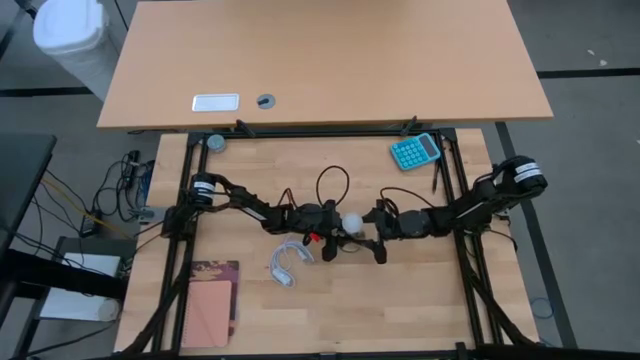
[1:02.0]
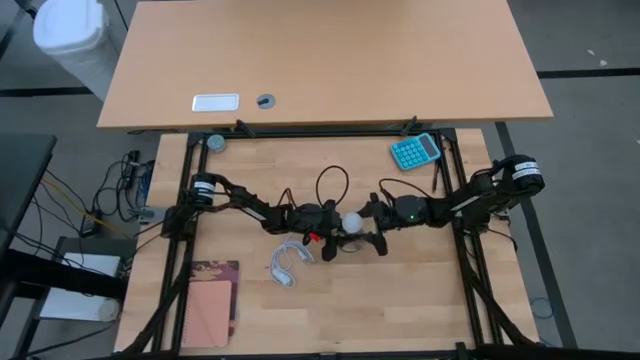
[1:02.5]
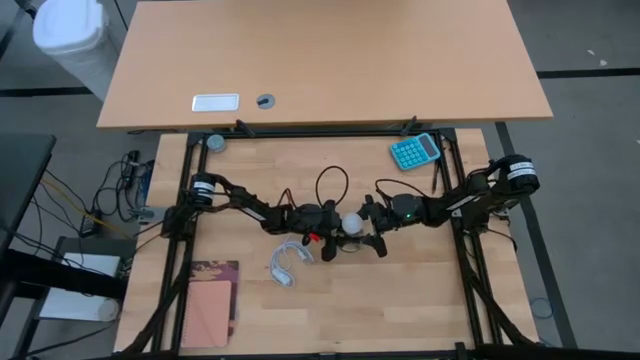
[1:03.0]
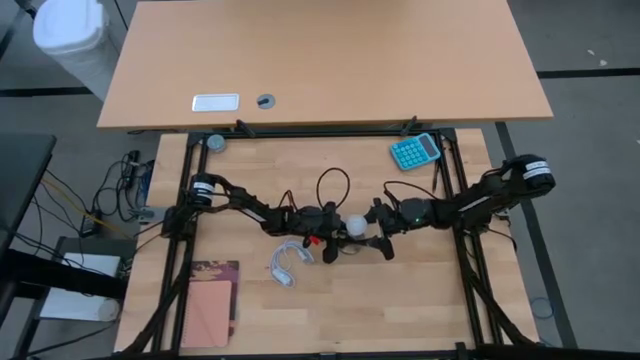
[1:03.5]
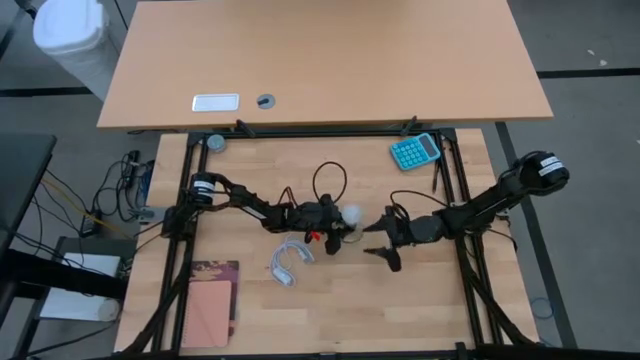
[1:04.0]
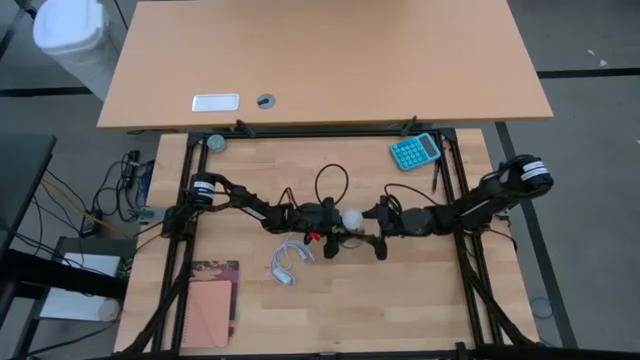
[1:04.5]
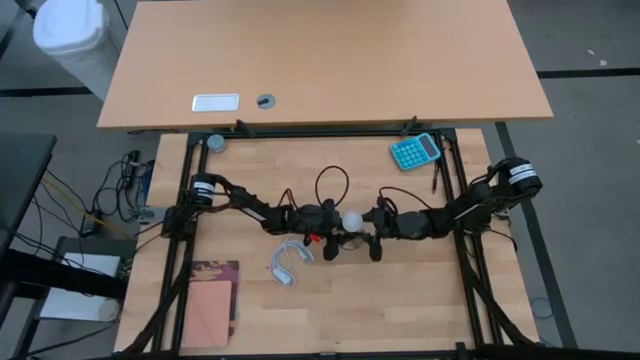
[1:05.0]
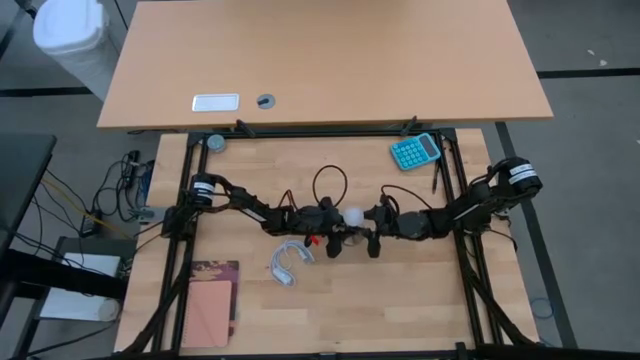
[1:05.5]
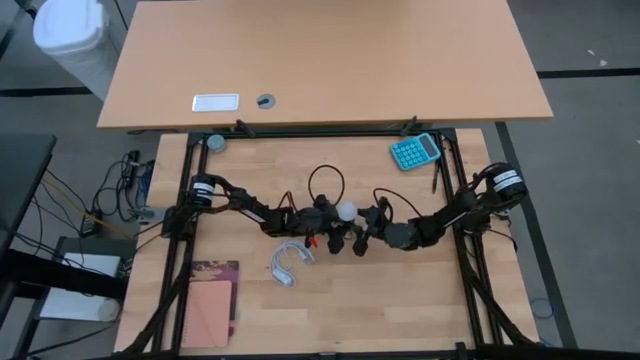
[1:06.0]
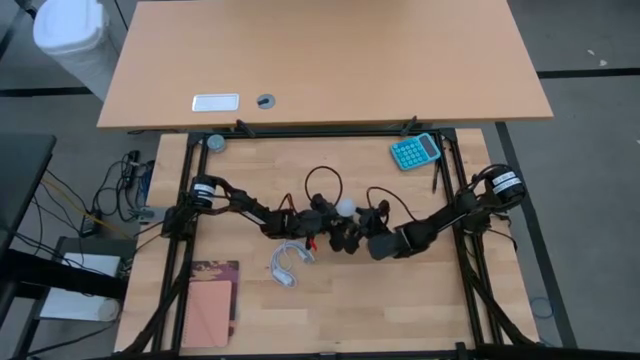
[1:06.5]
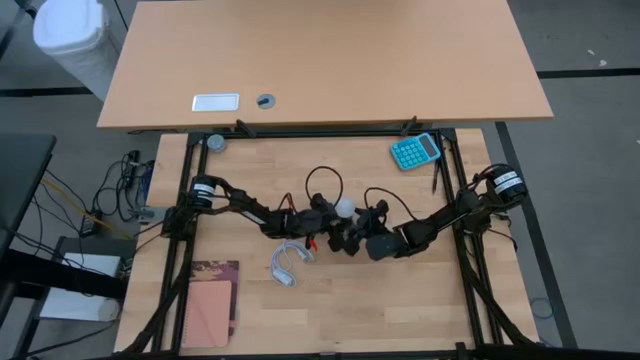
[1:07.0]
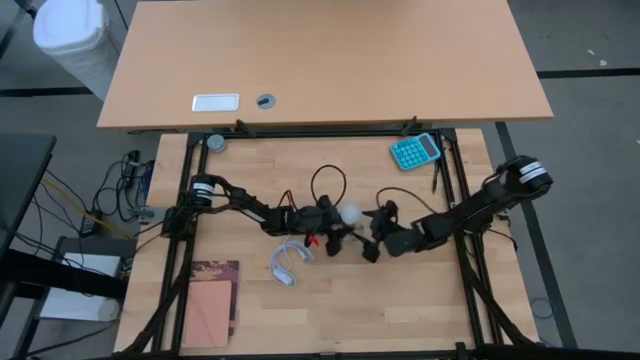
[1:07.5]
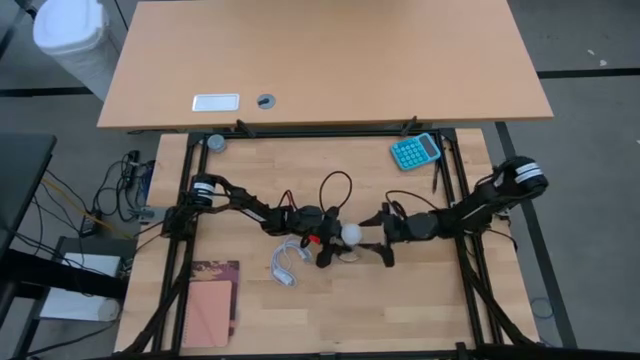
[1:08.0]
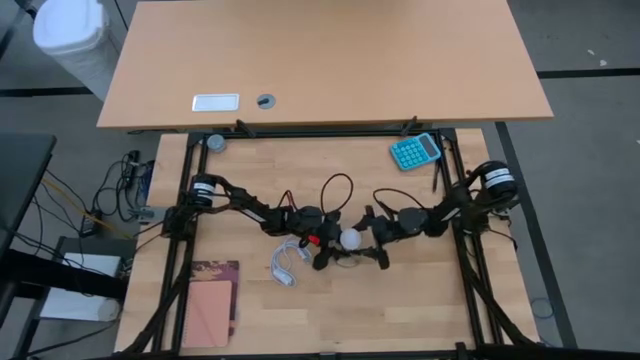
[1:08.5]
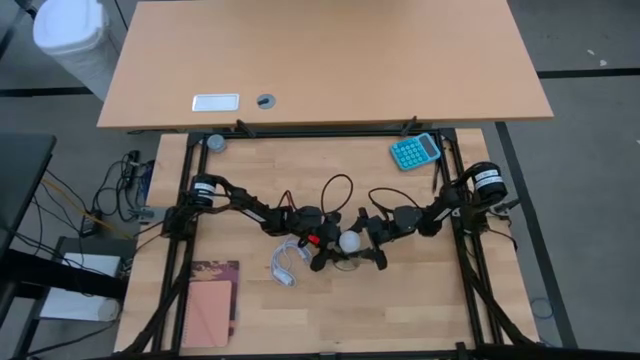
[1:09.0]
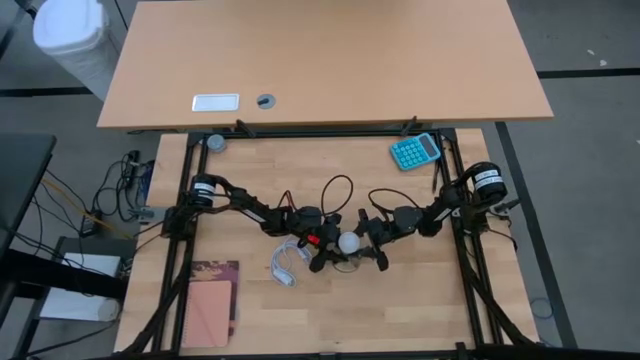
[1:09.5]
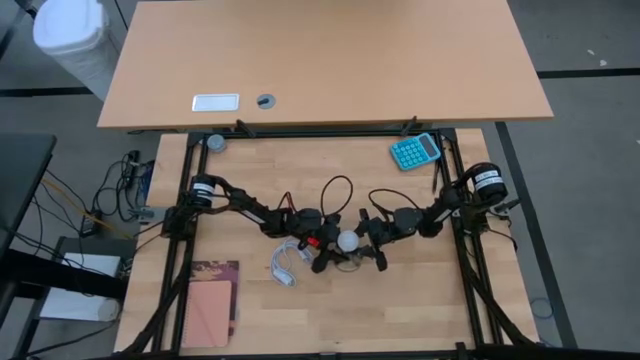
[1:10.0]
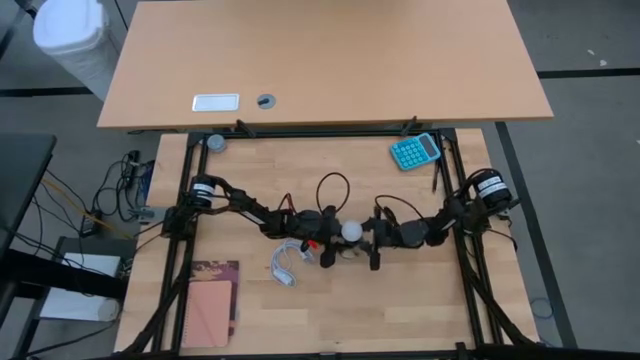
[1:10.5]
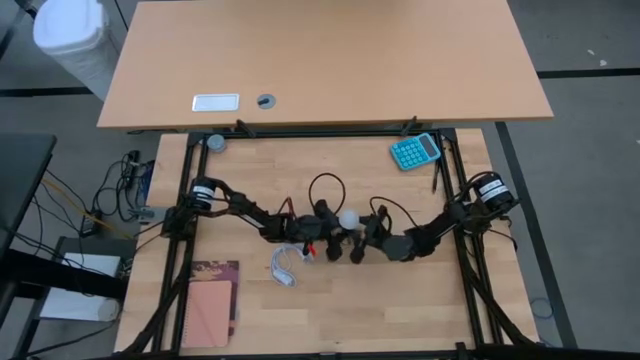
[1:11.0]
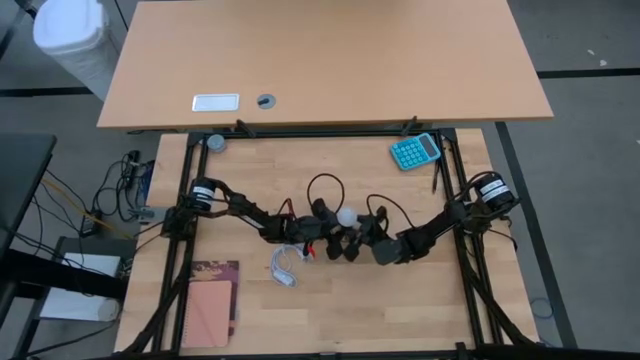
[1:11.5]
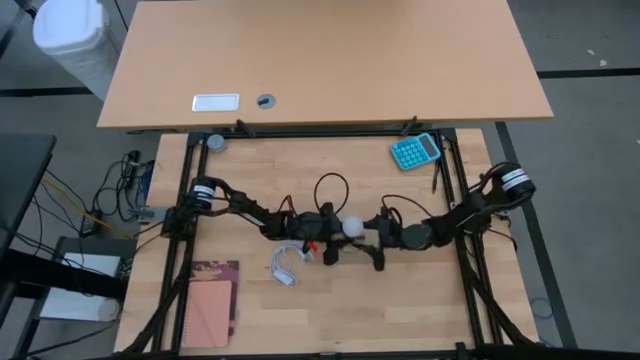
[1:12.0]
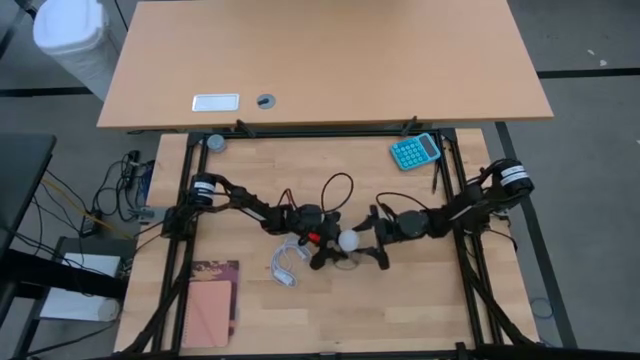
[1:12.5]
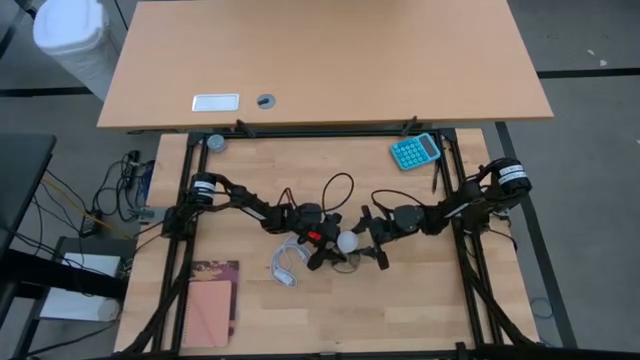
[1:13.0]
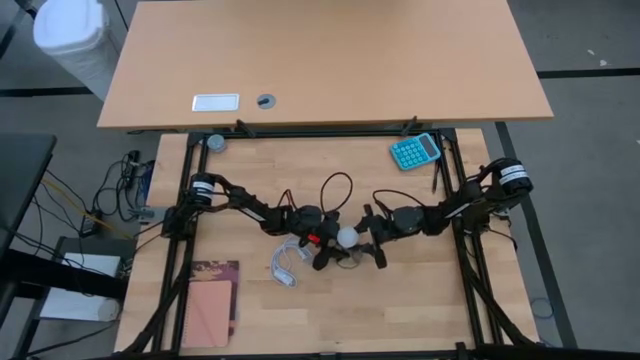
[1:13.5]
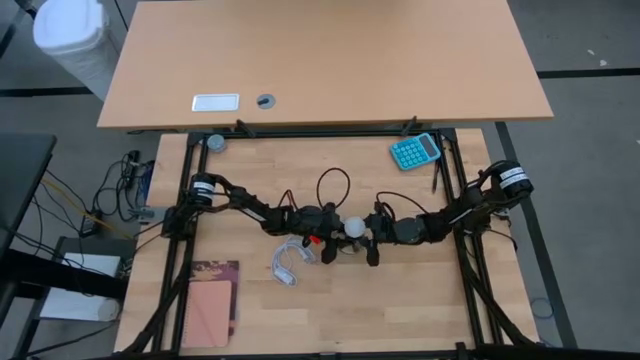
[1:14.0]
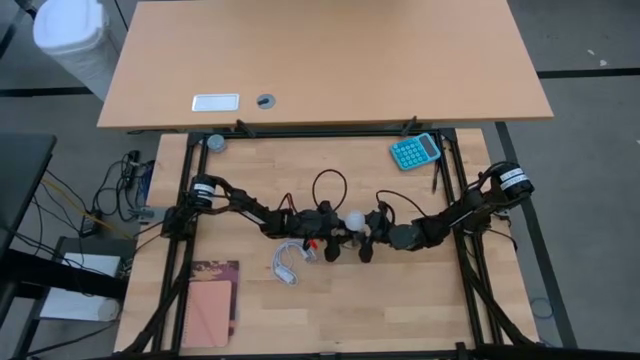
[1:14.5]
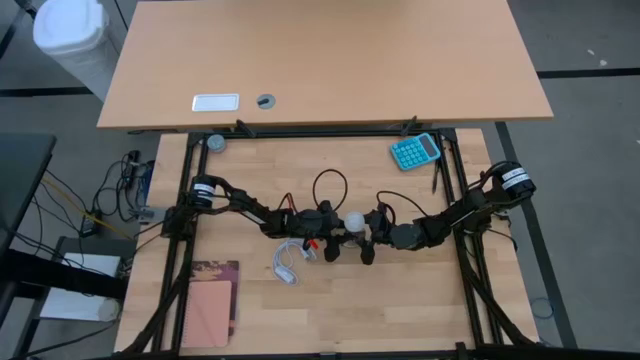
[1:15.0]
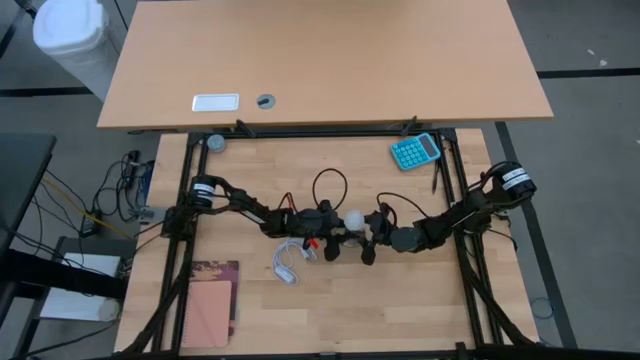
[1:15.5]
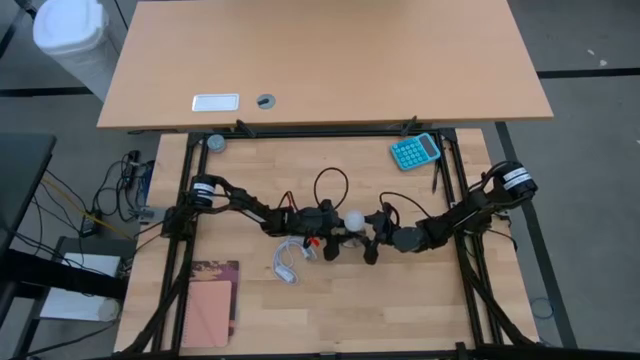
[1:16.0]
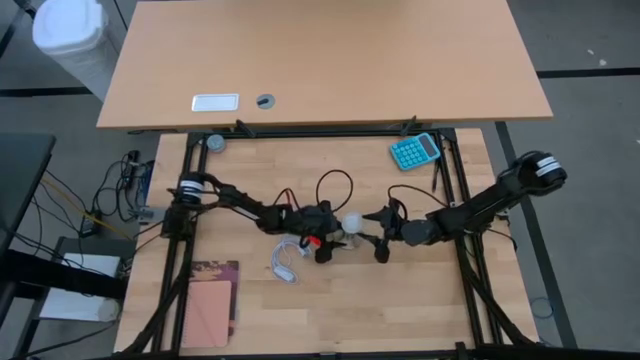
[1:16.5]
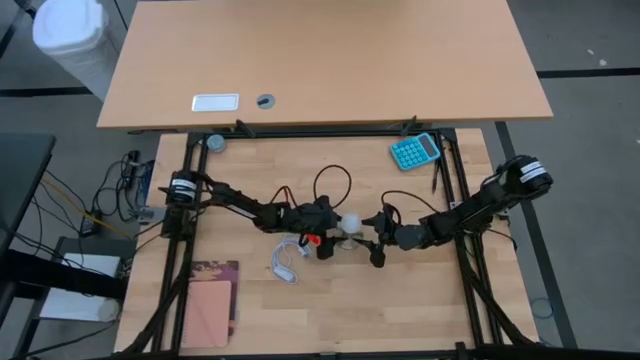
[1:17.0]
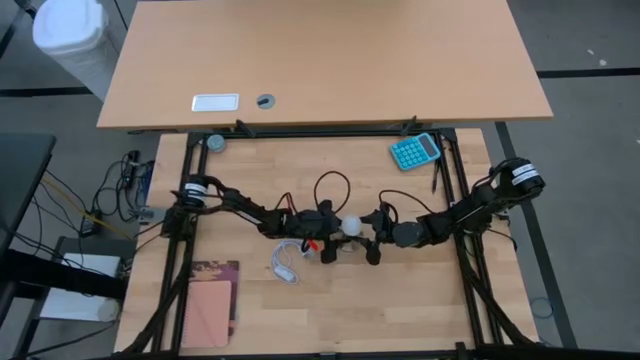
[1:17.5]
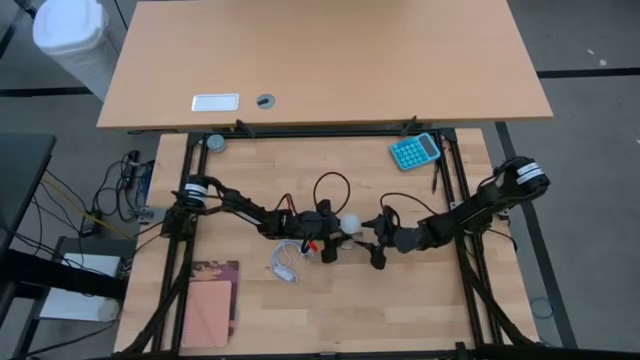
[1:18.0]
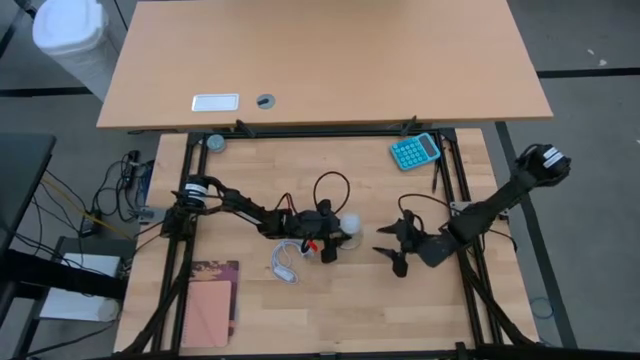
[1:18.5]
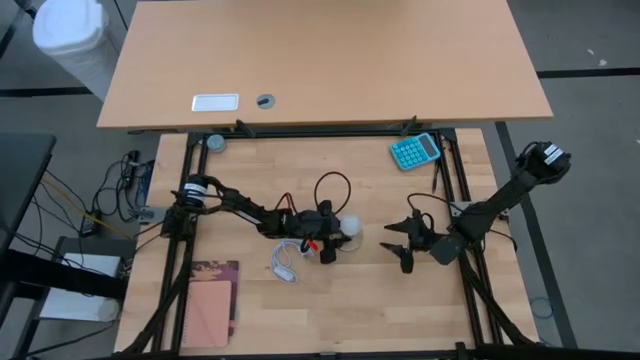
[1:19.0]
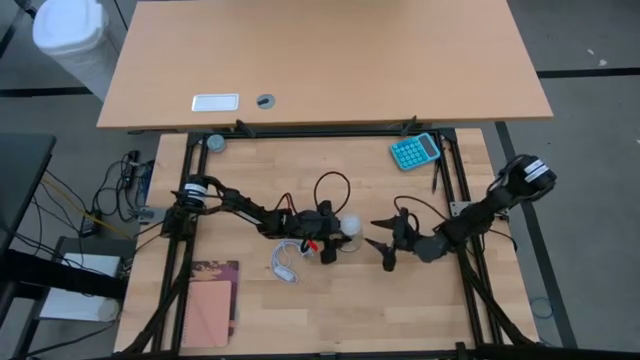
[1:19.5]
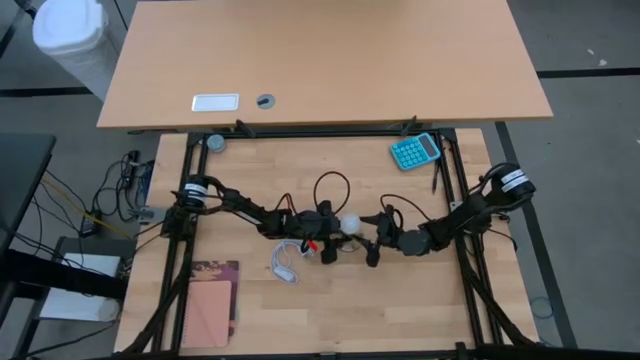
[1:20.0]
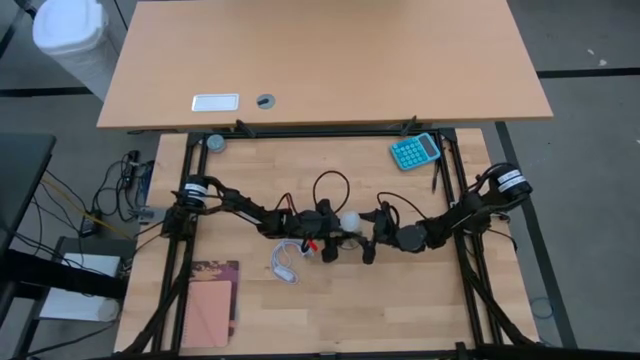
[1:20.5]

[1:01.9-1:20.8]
Task: Screw lightbulb
Insert the lightbulb into the lamp socket
